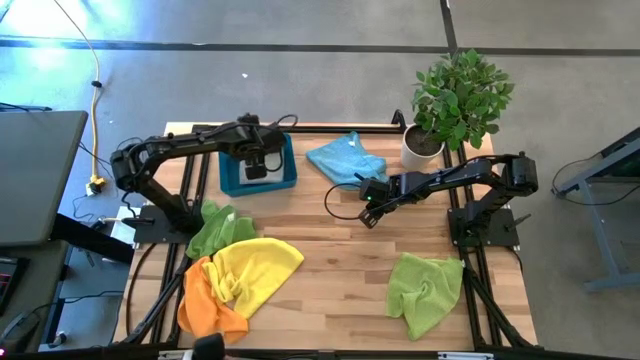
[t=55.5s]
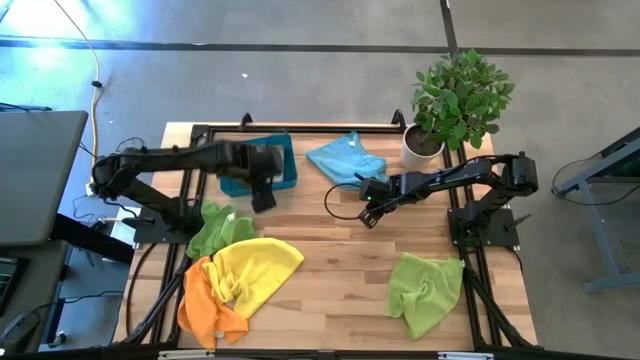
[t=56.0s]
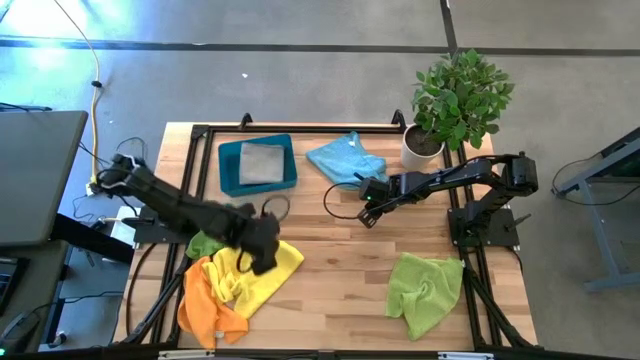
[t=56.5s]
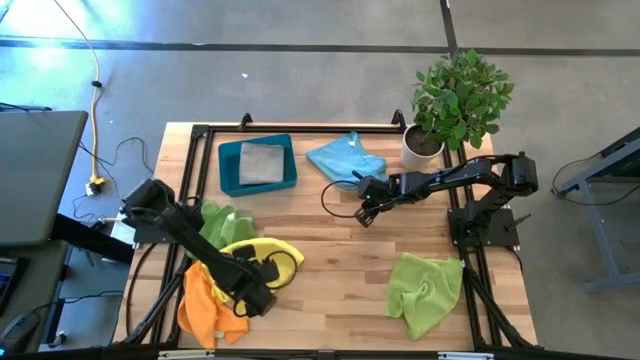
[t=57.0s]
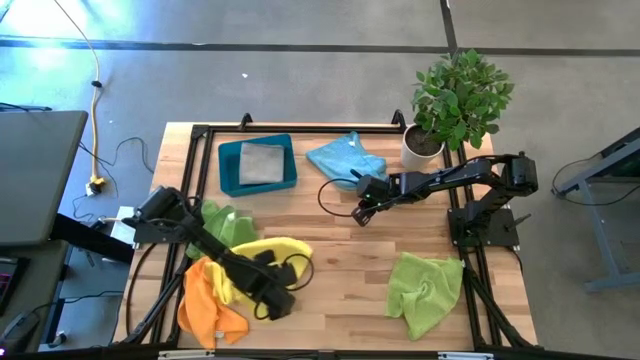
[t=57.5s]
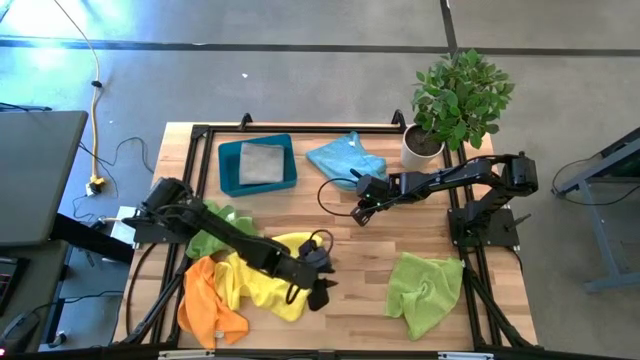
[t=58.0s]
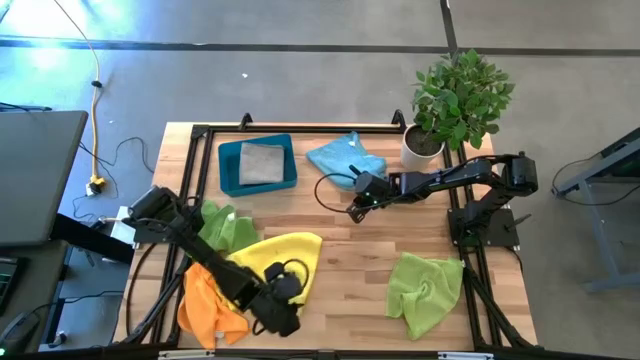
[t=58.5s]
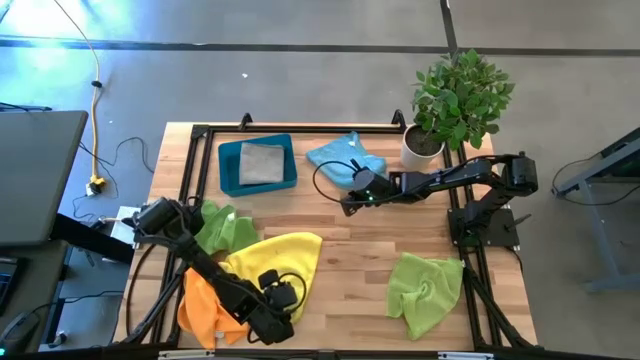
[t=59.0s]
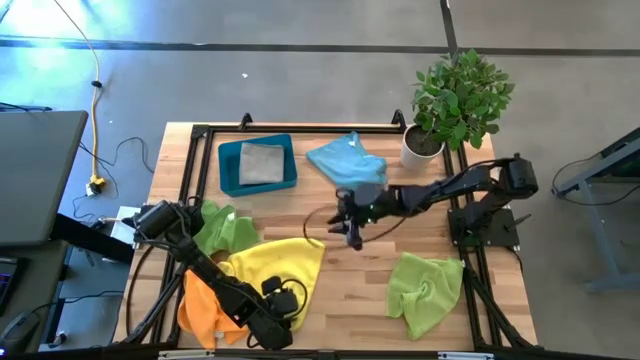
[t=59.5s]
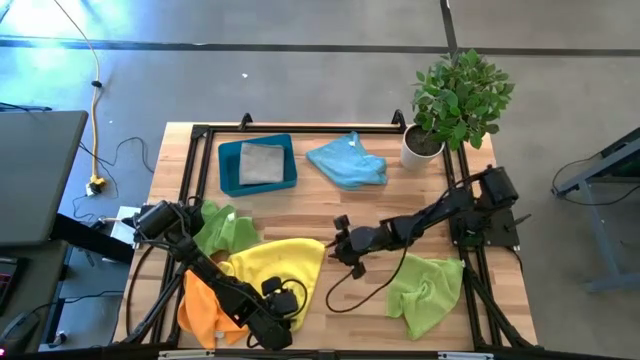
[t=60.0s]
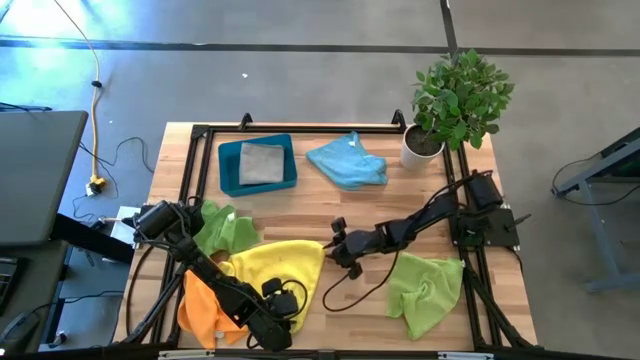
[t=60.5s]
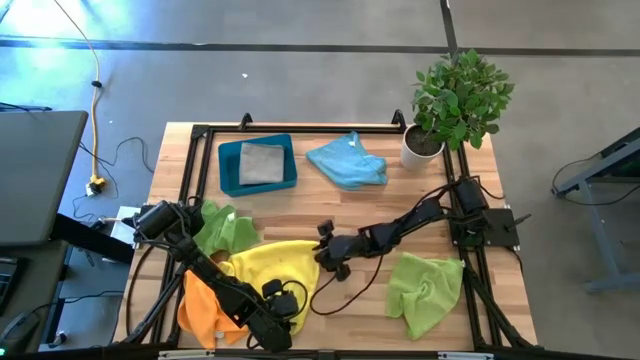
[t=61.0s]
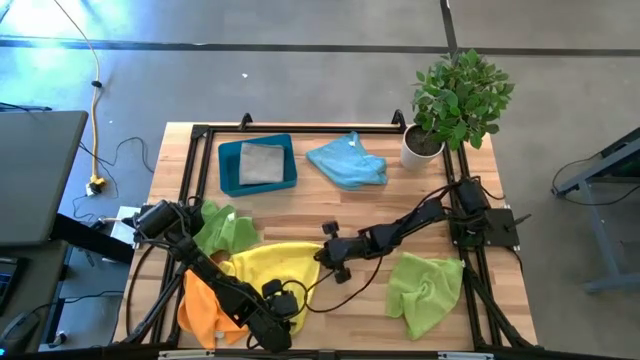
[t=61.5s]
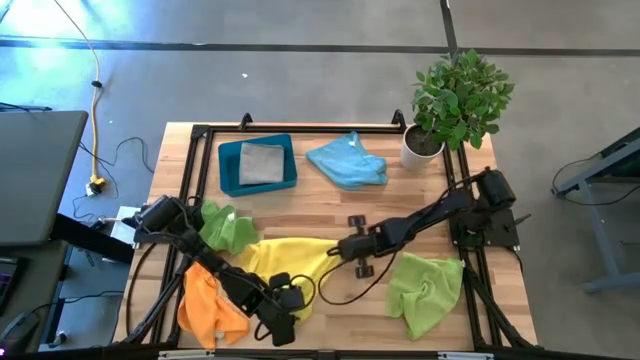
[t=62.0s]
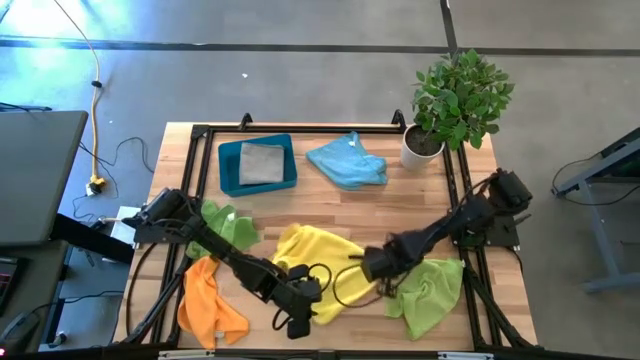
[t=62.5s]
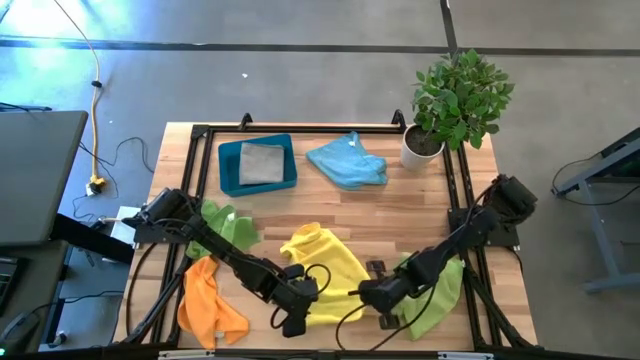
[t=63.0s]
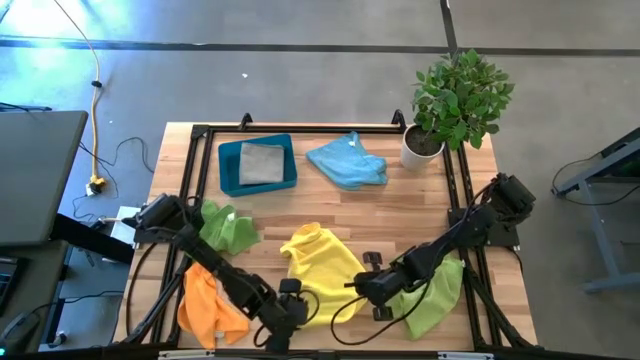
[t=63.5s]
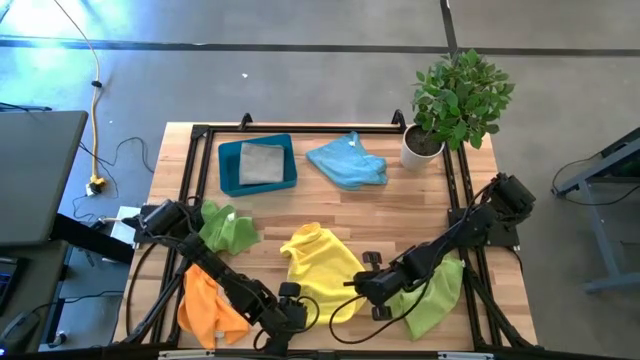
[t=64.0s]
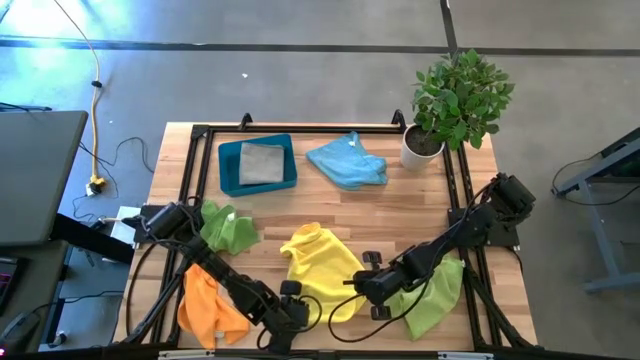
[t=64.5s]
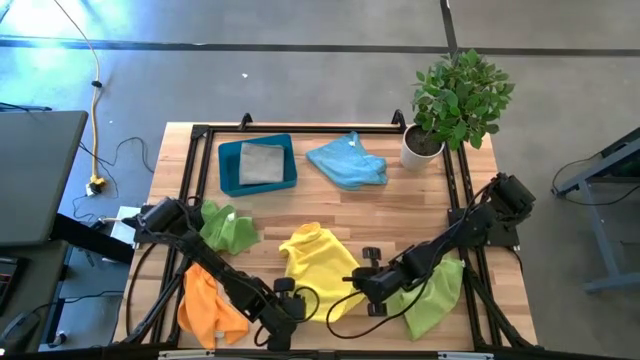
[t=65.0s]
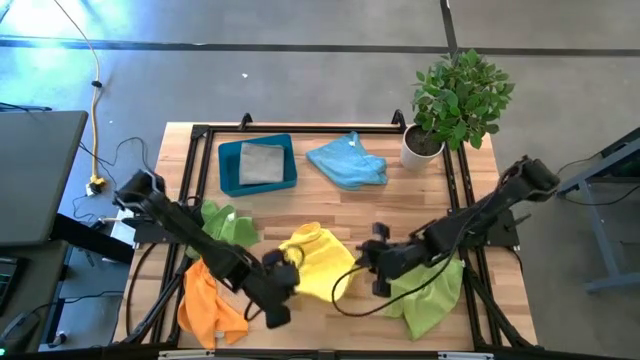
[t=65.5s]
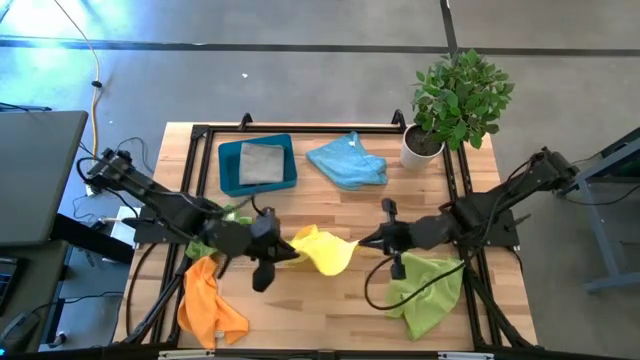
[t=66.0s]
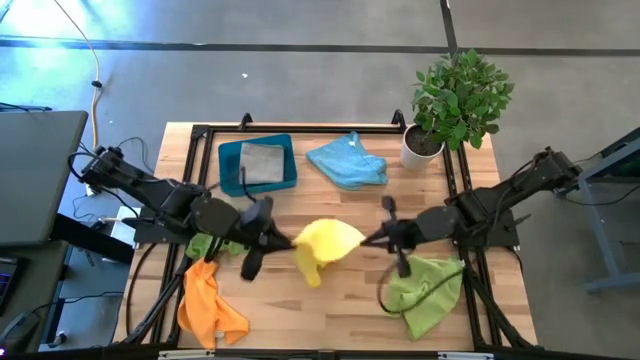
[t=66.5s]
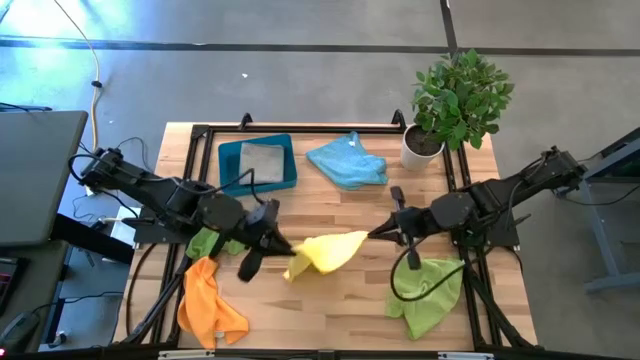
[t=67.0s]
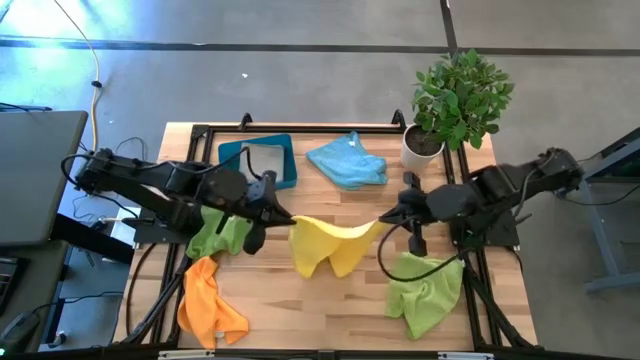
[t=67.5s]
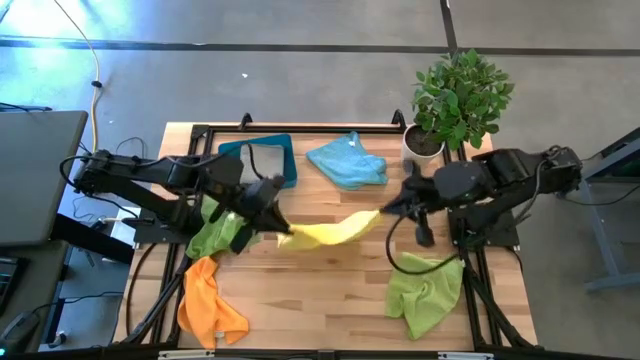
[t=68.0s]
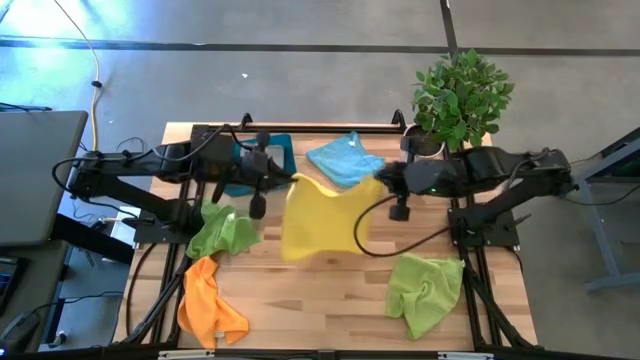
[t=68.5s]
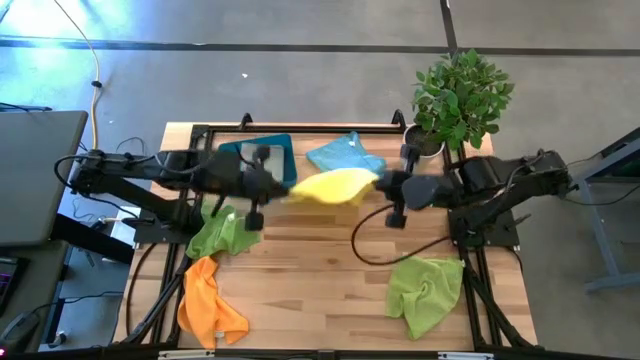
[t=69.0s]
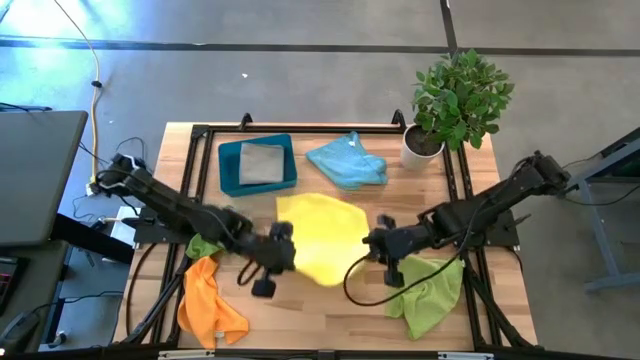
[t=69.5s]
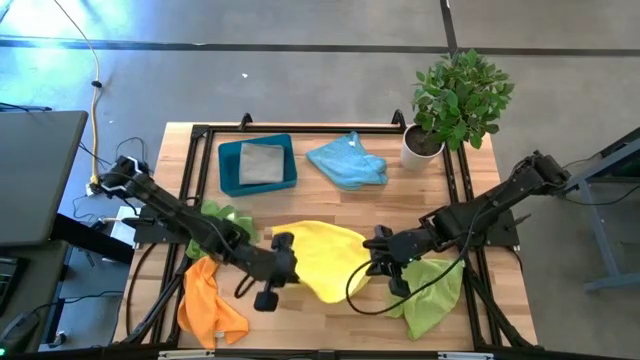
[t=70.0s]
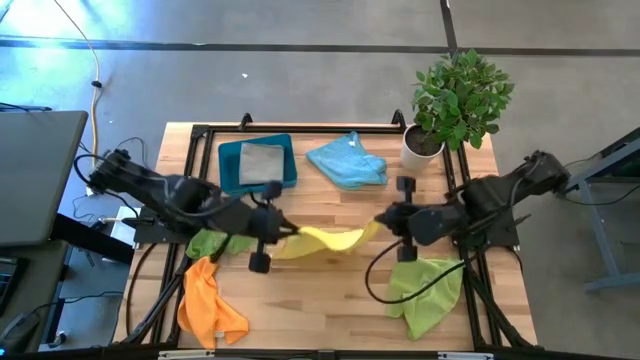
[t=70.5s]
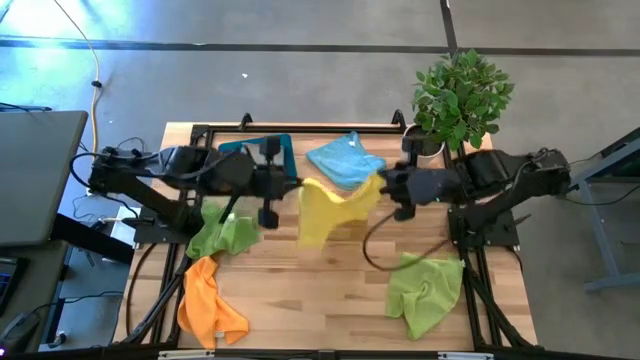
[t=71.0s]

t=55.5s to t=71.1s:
Task: Fold microfiber towels
Fold the yellow microfiber cloth
